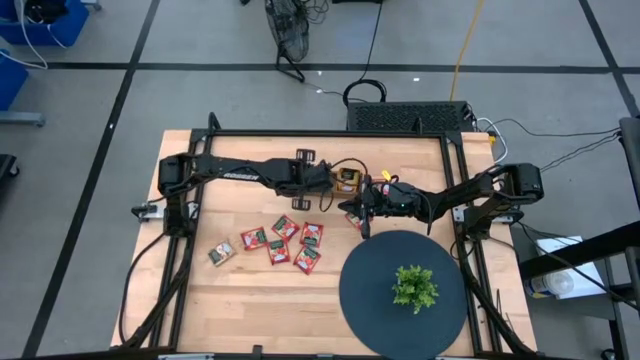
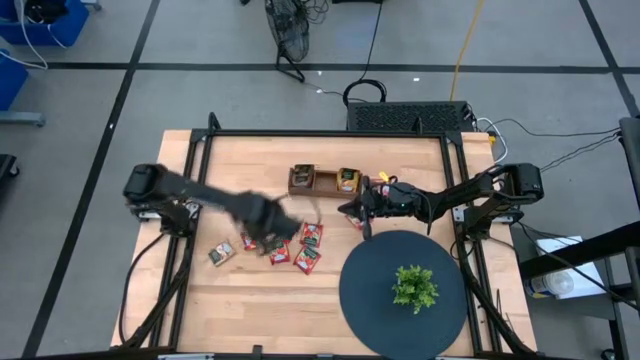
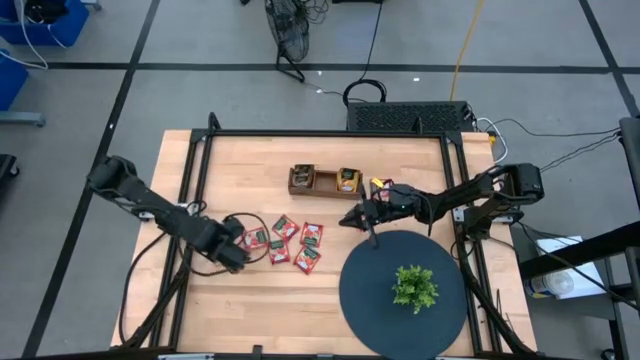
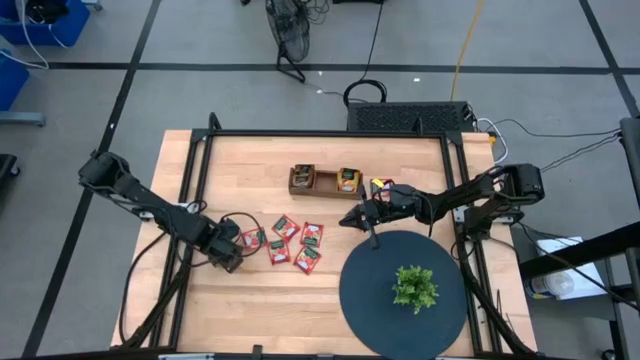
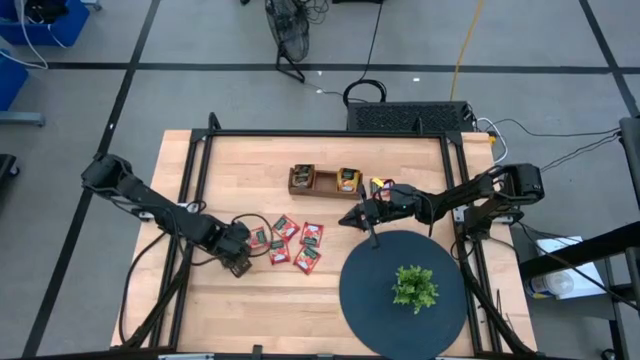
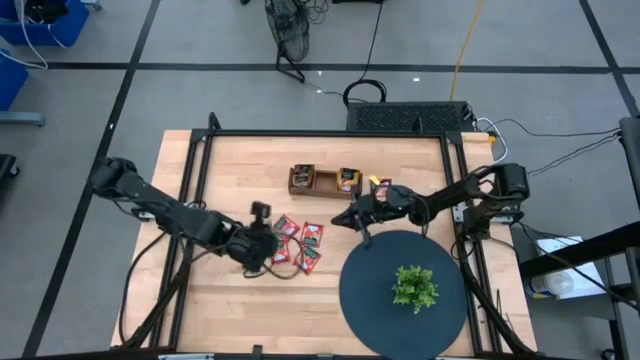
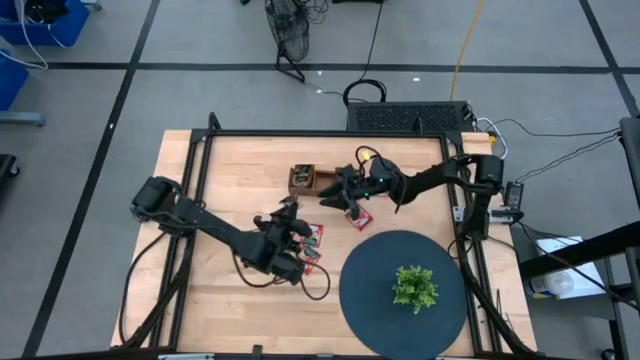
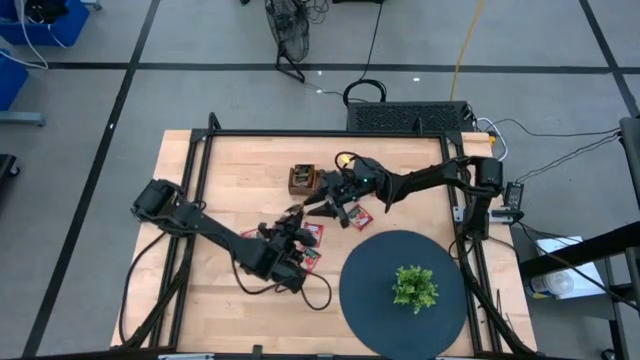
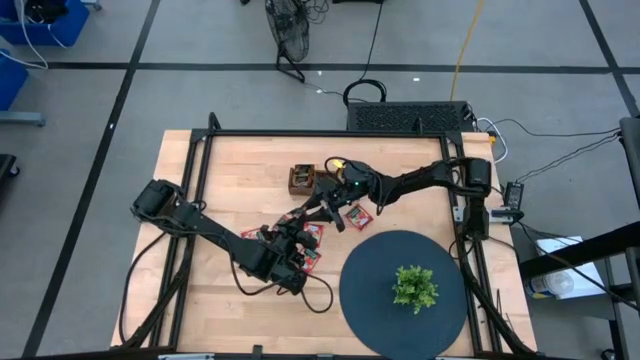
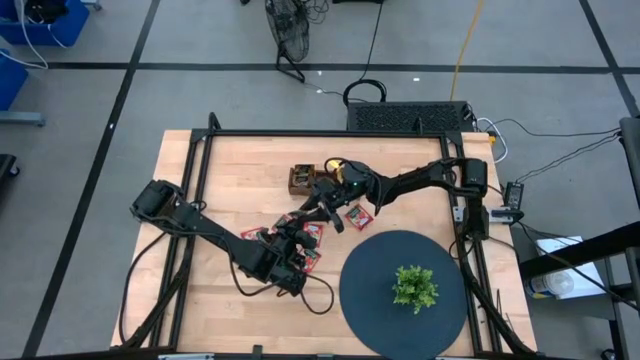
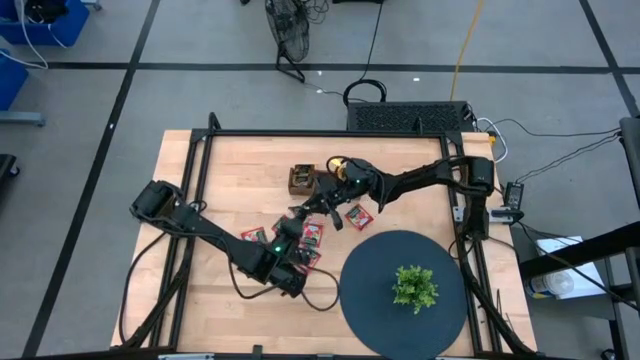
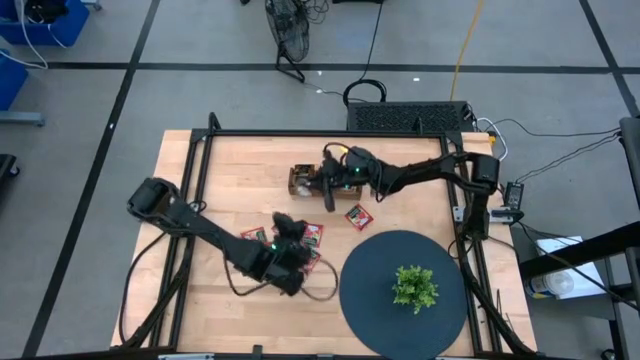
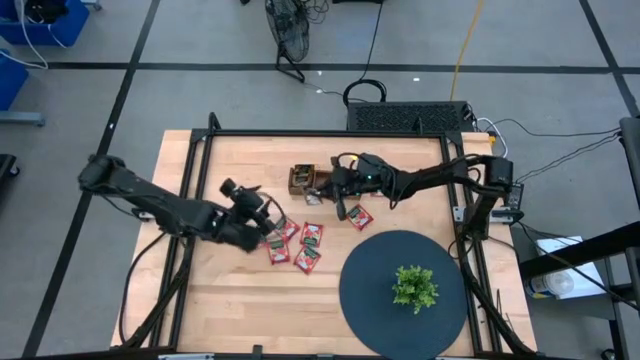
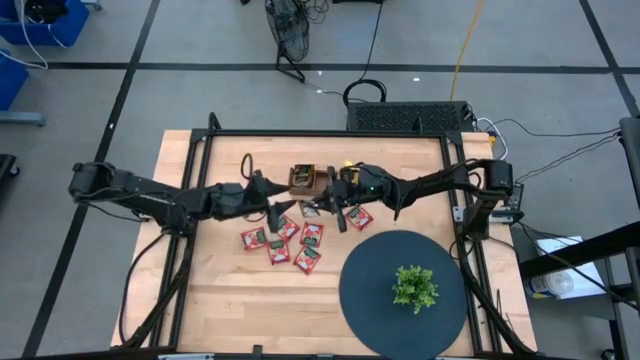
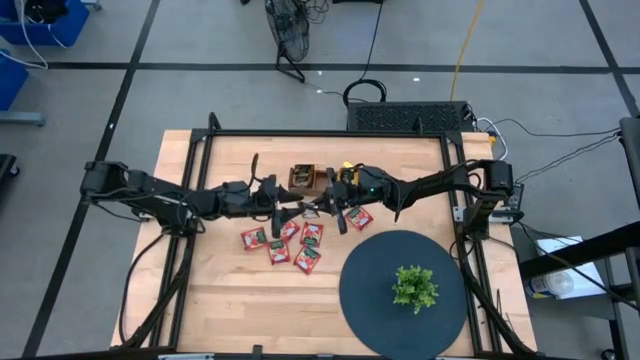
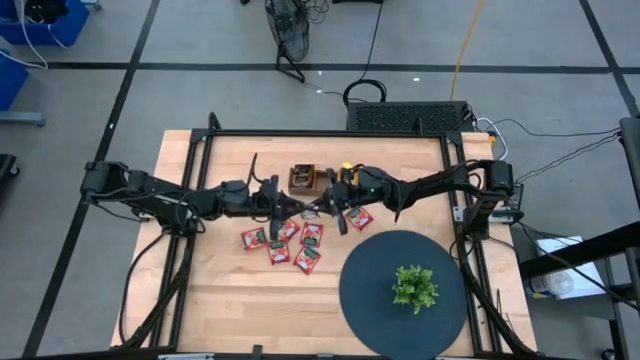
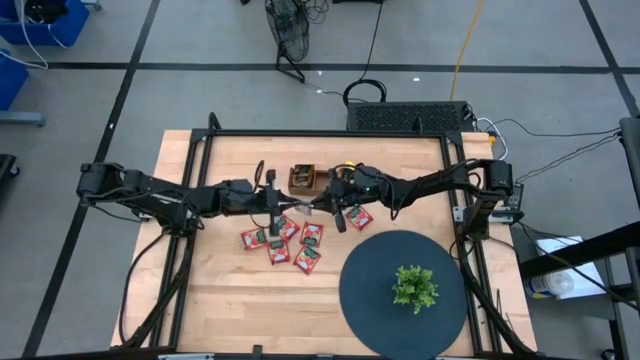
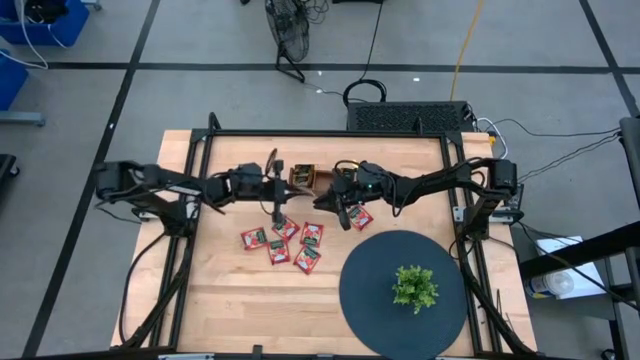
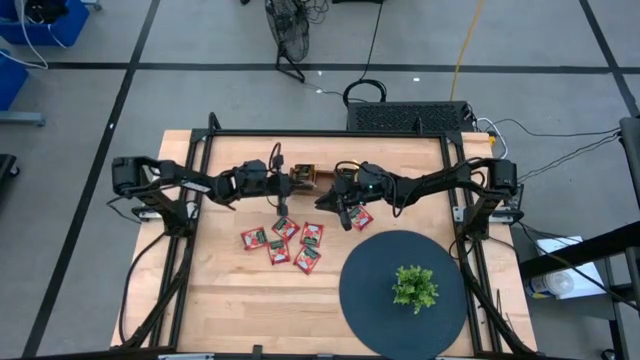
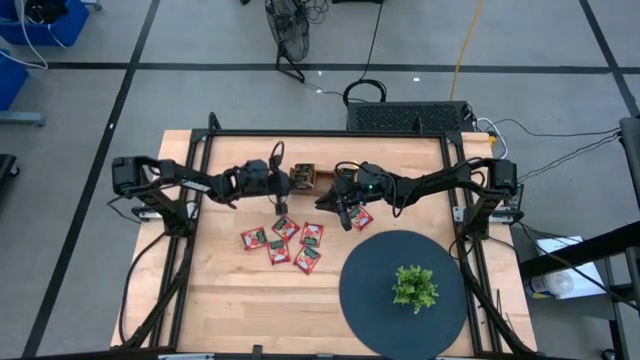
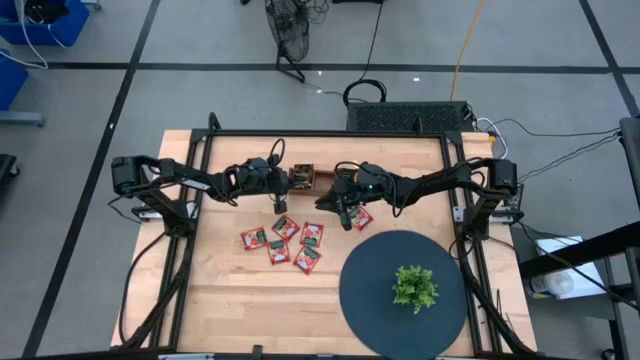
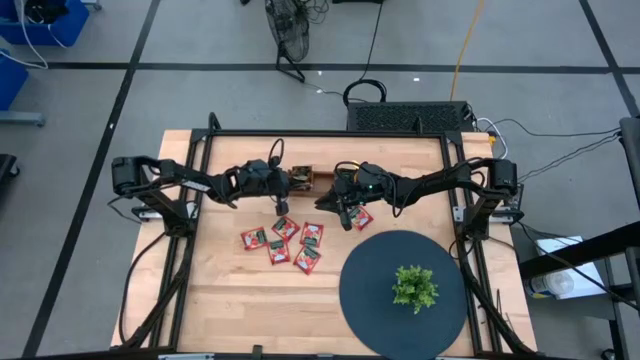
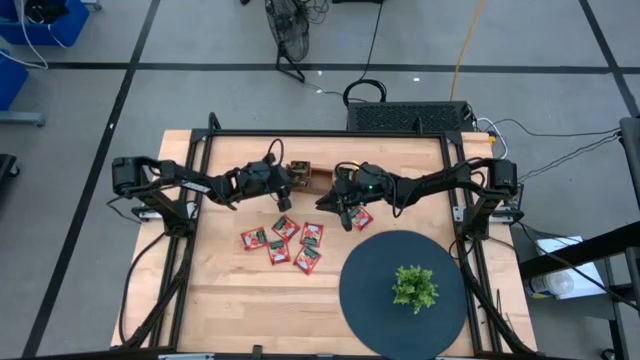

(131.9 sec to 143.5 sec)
Task: Pick & Place Tea
Put the brown tea bag into the left section wooden organizer

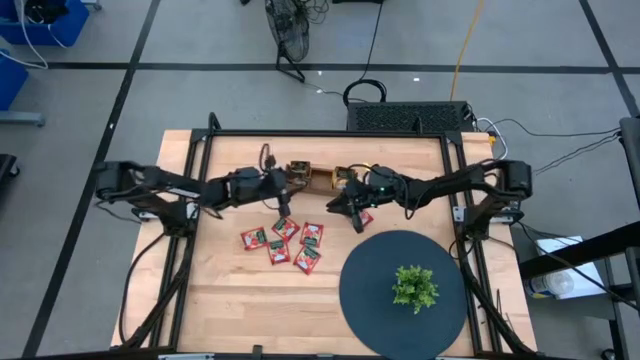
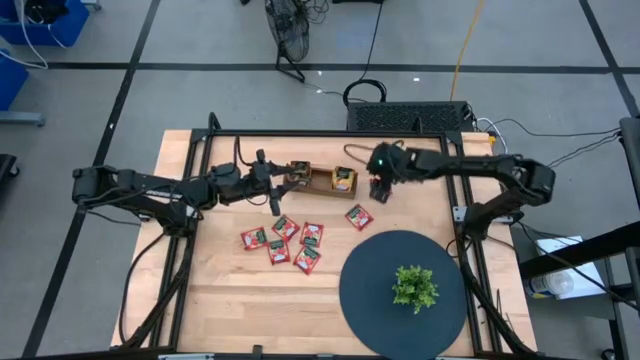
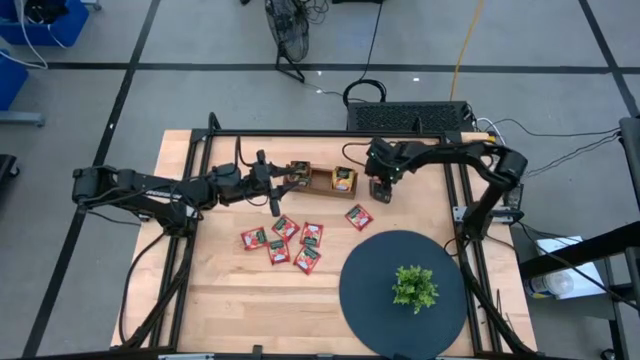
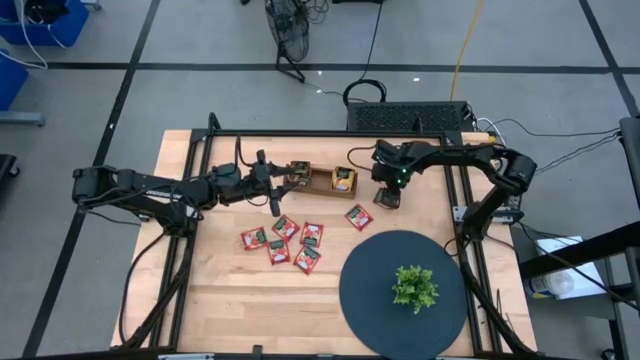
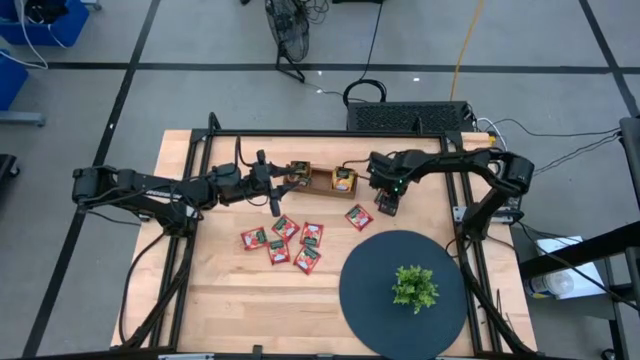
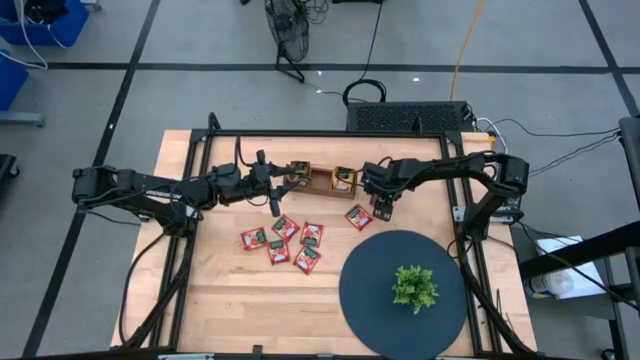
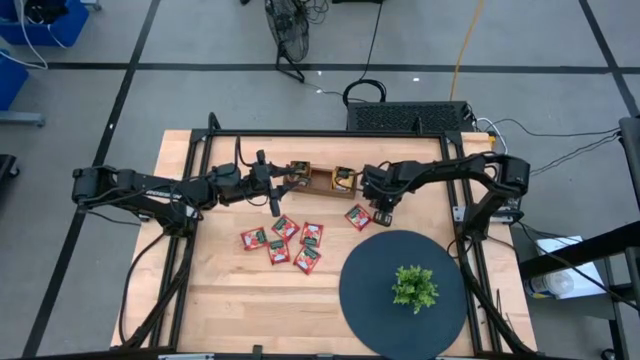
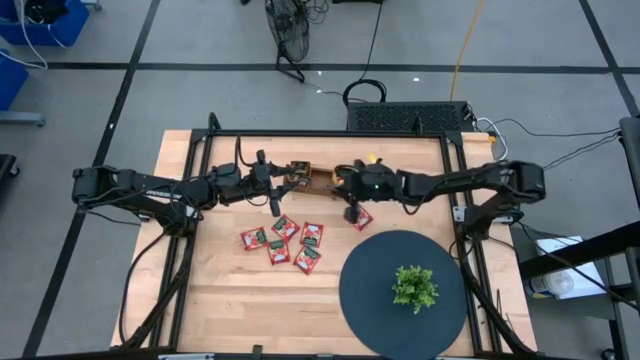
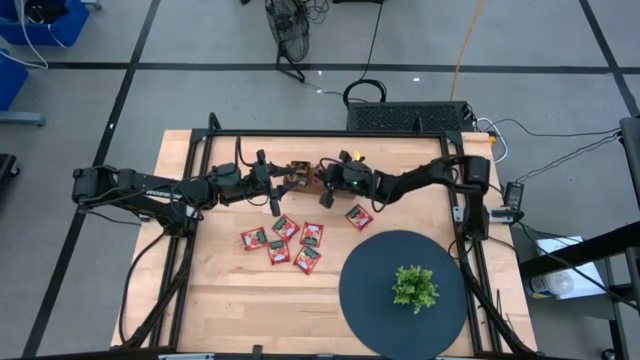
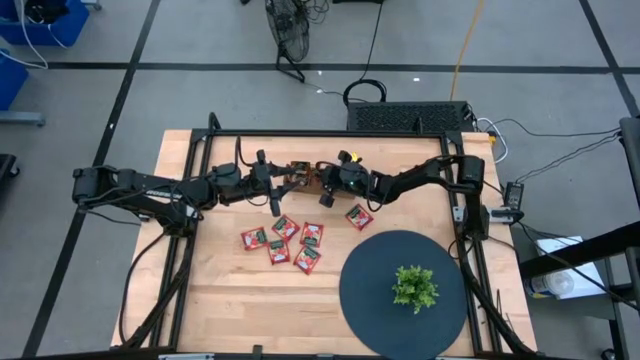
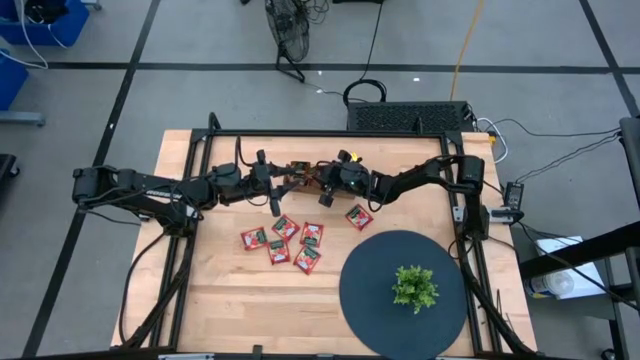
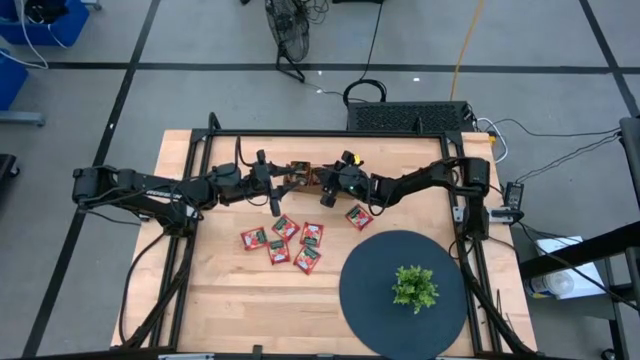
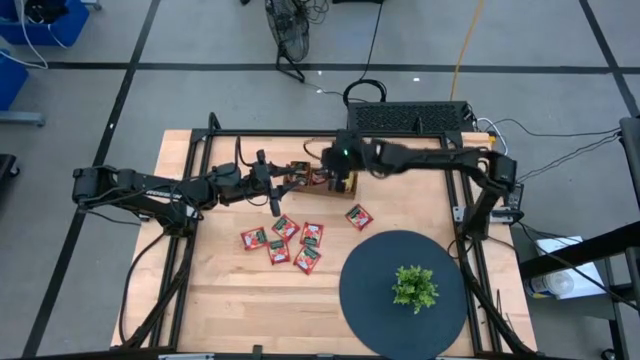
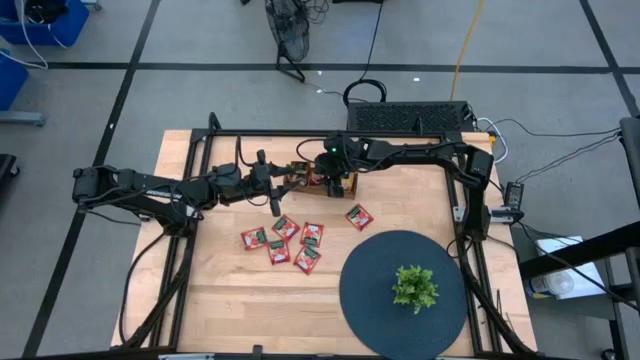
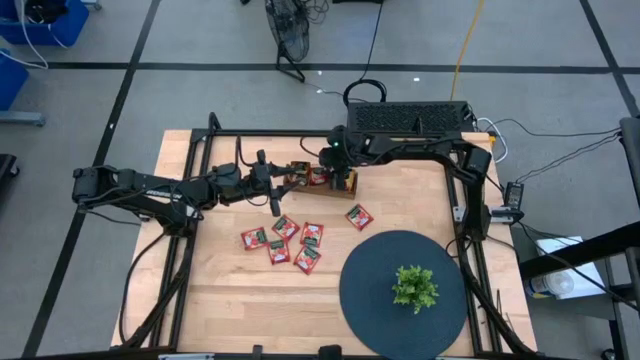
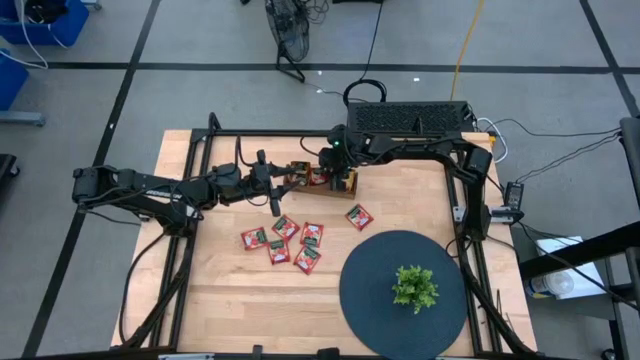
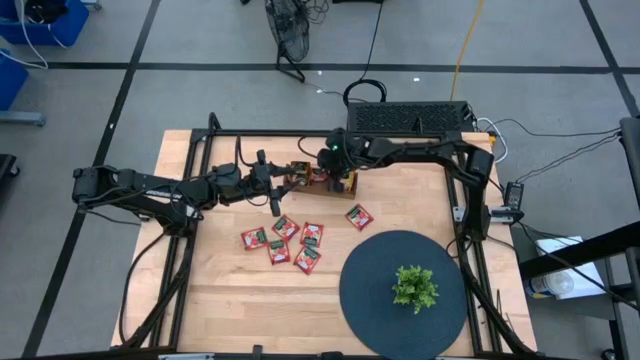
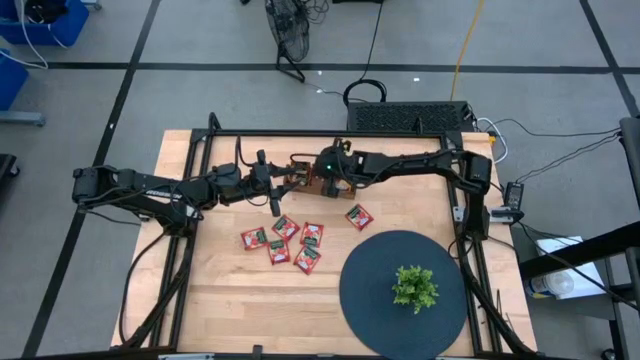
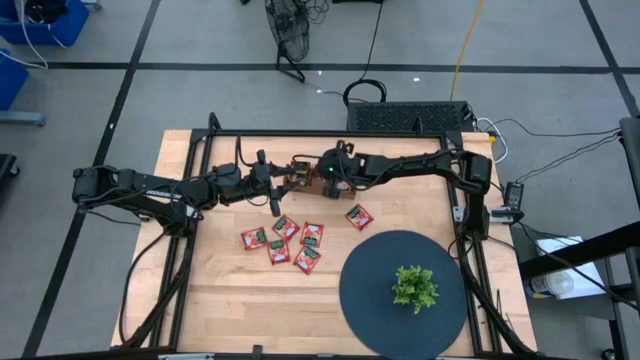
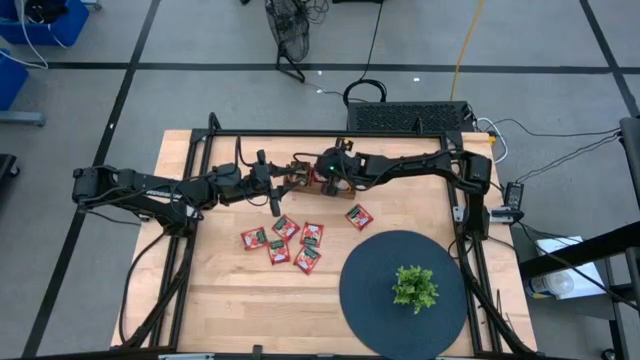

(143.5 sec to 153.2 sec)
Put the red tea bag into the middle section wooden organizer
